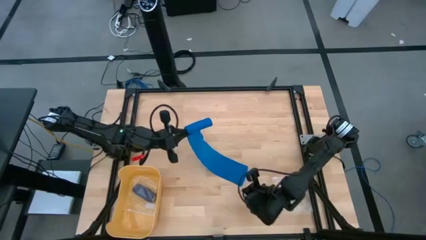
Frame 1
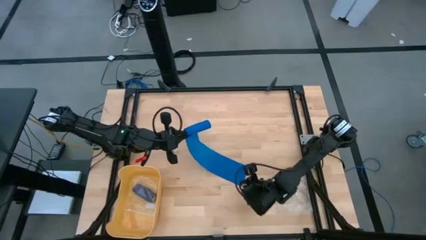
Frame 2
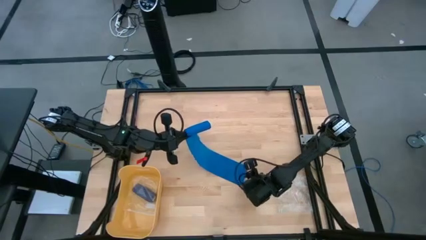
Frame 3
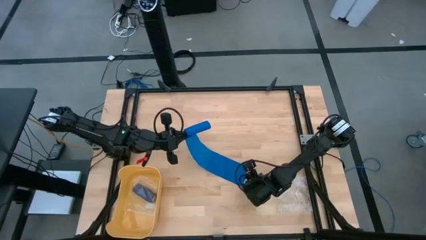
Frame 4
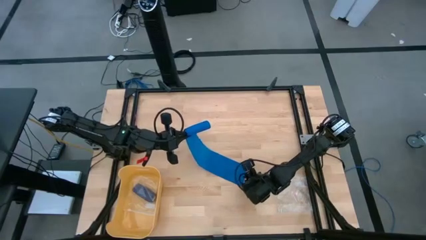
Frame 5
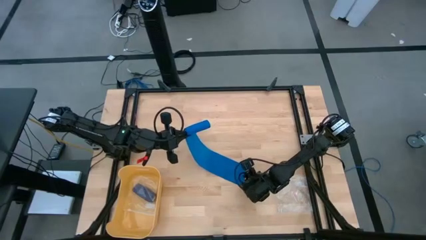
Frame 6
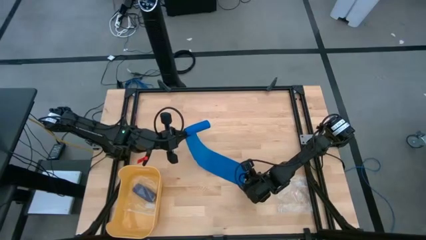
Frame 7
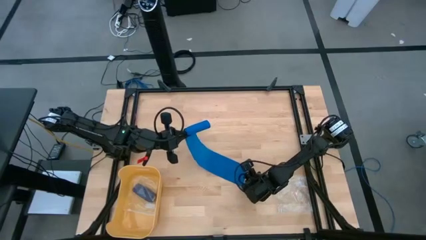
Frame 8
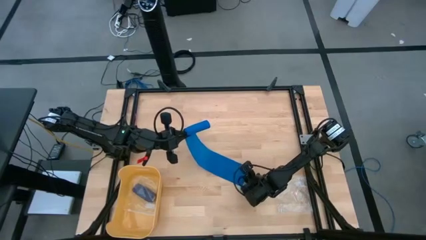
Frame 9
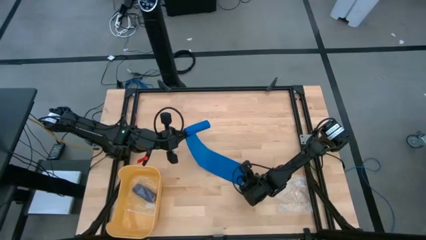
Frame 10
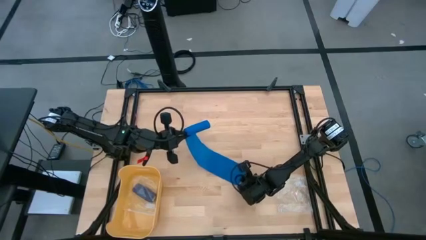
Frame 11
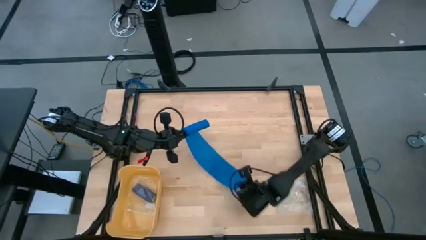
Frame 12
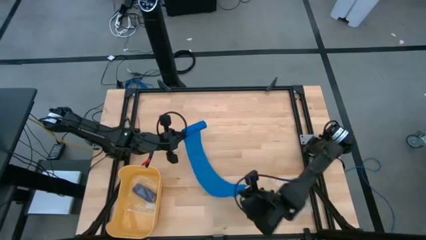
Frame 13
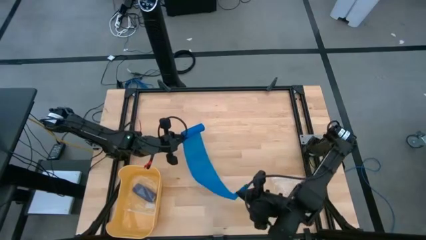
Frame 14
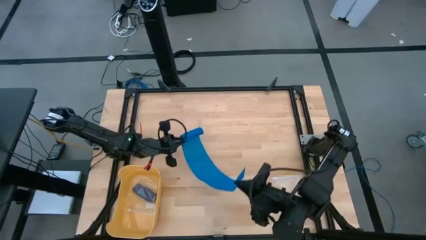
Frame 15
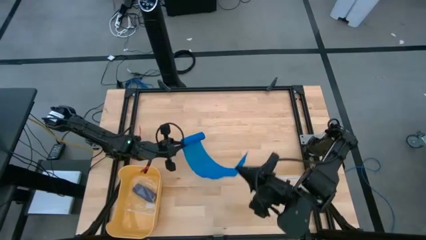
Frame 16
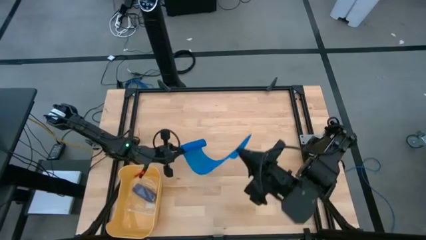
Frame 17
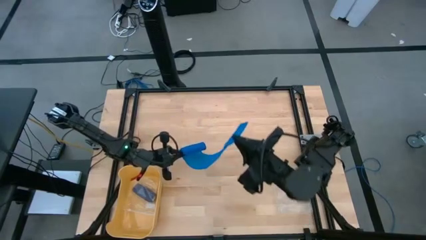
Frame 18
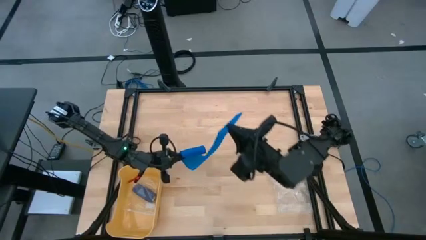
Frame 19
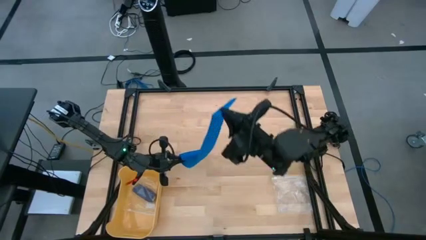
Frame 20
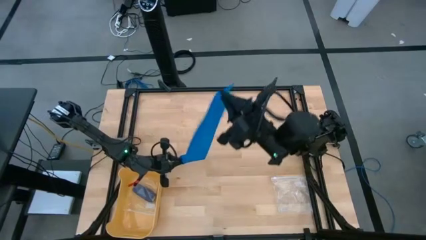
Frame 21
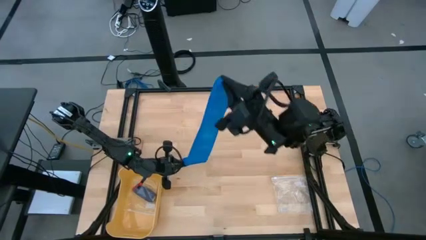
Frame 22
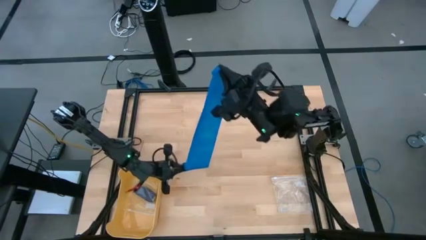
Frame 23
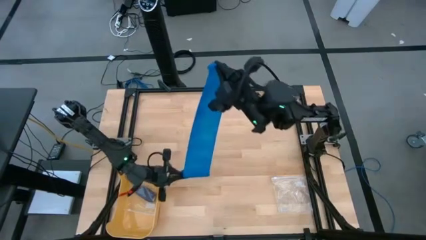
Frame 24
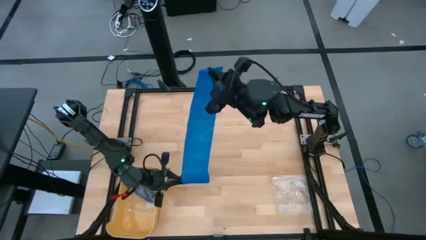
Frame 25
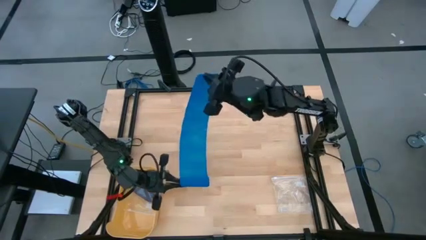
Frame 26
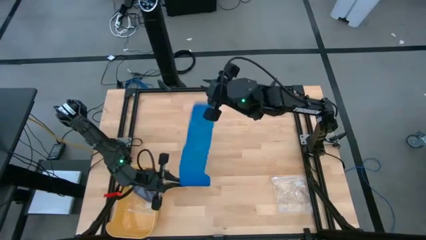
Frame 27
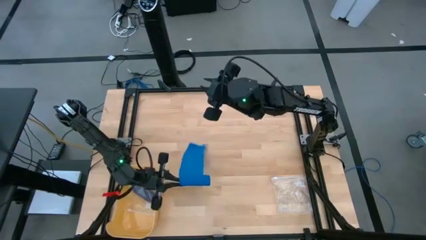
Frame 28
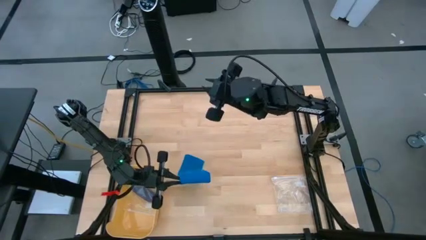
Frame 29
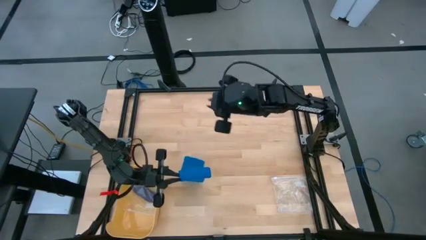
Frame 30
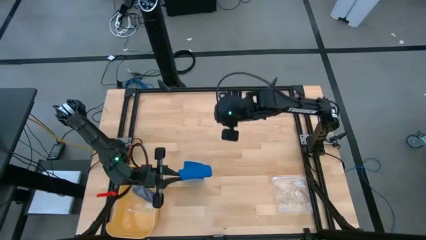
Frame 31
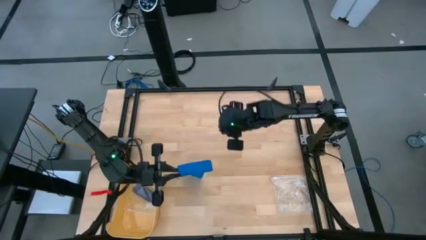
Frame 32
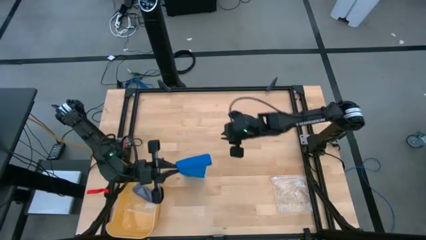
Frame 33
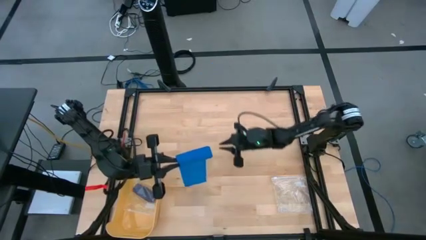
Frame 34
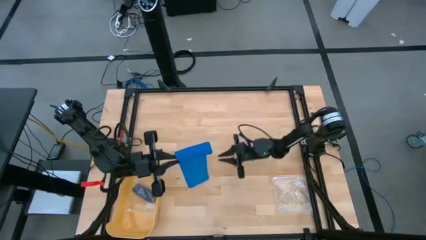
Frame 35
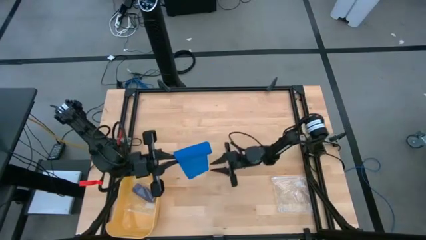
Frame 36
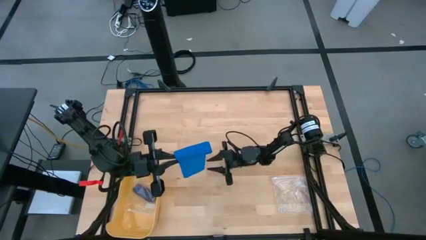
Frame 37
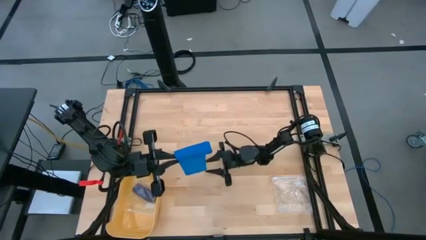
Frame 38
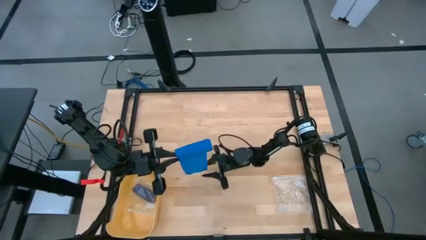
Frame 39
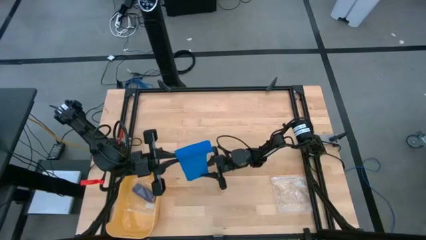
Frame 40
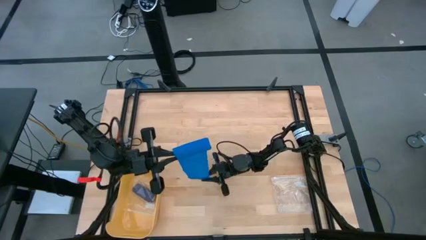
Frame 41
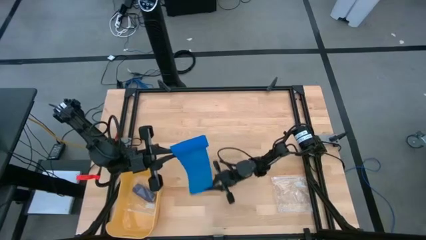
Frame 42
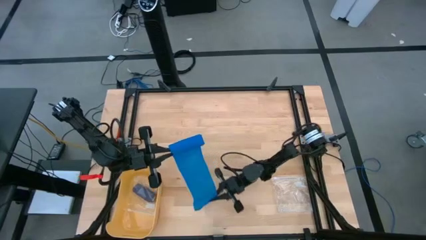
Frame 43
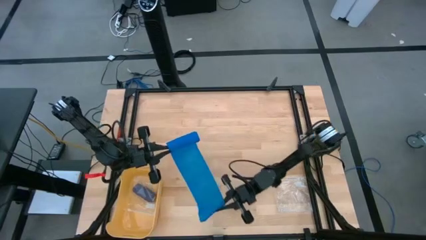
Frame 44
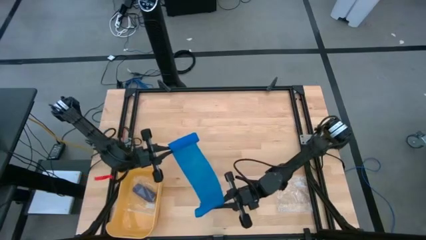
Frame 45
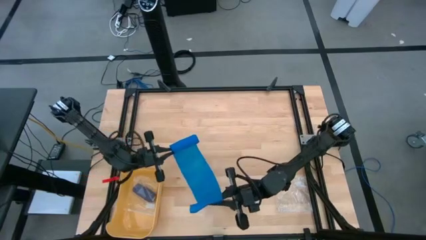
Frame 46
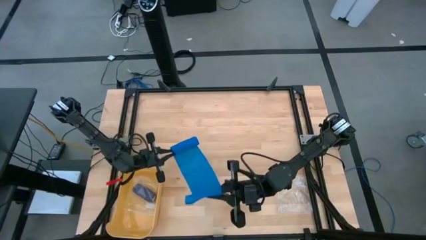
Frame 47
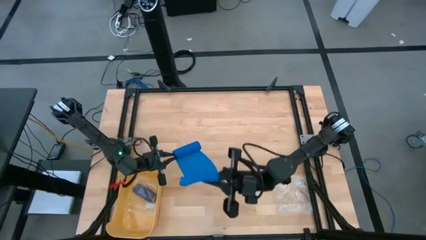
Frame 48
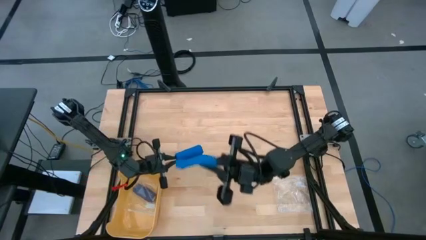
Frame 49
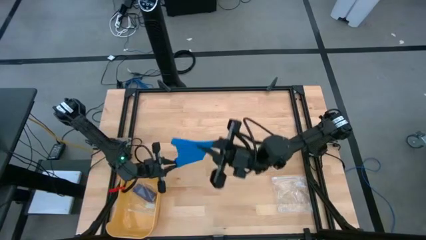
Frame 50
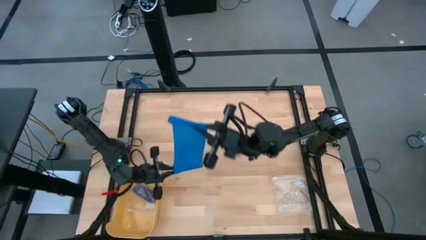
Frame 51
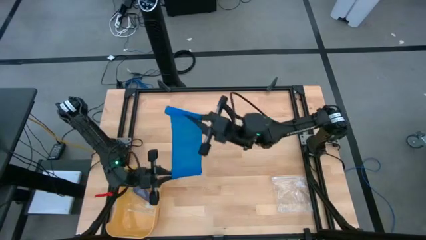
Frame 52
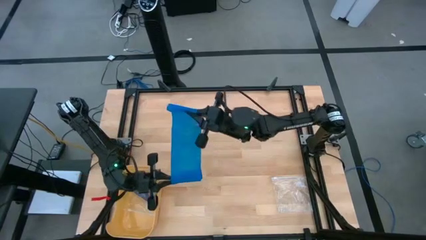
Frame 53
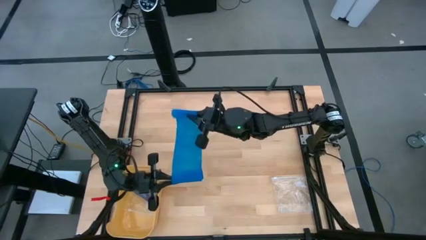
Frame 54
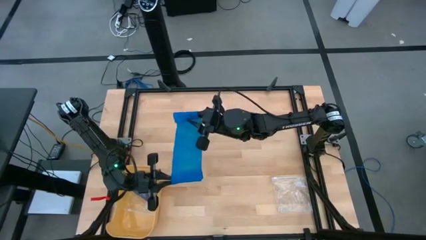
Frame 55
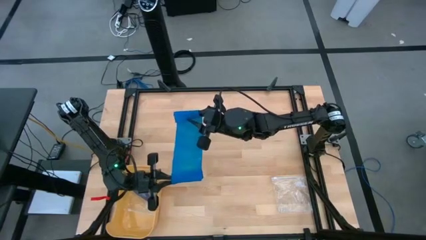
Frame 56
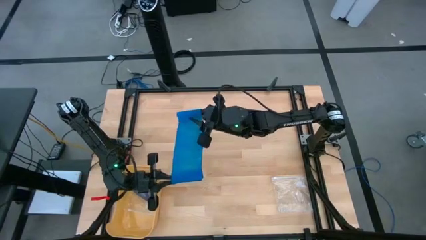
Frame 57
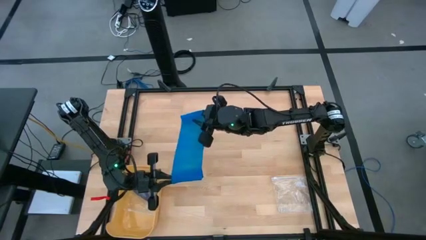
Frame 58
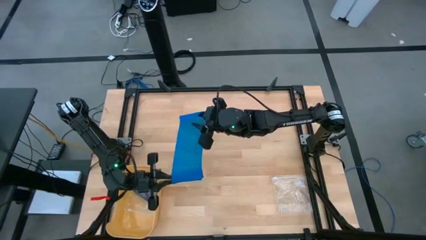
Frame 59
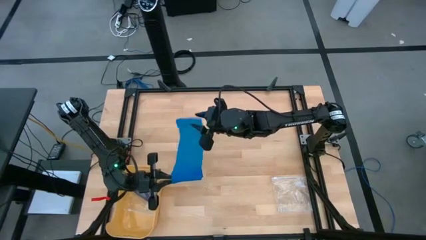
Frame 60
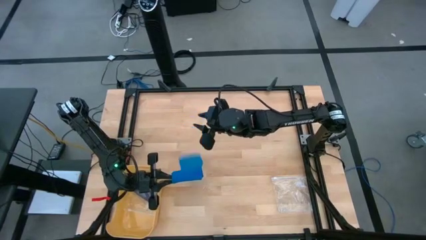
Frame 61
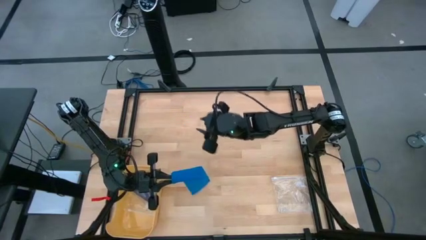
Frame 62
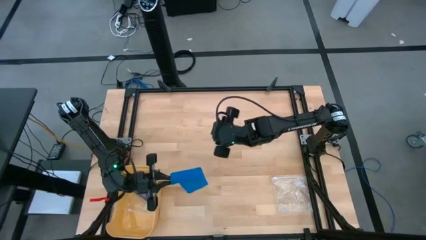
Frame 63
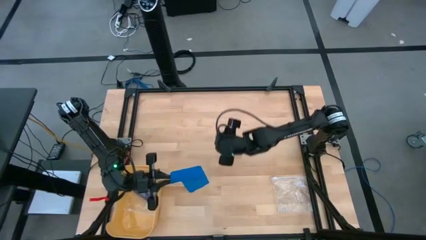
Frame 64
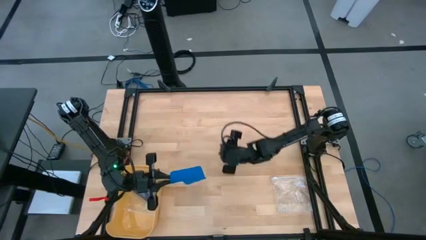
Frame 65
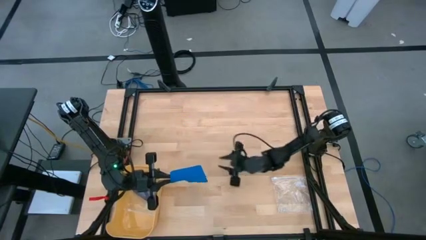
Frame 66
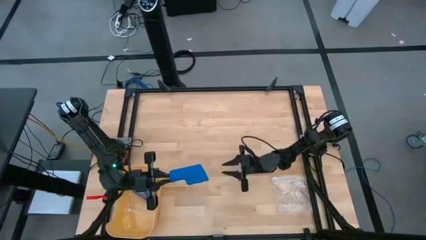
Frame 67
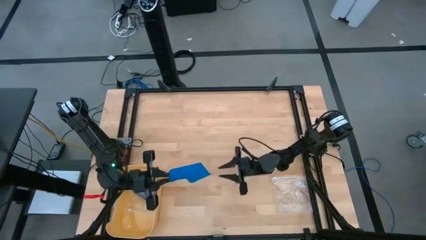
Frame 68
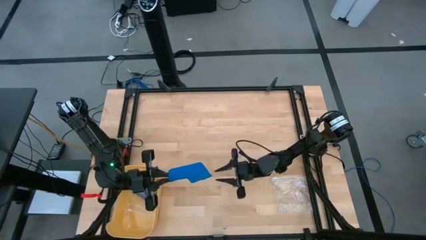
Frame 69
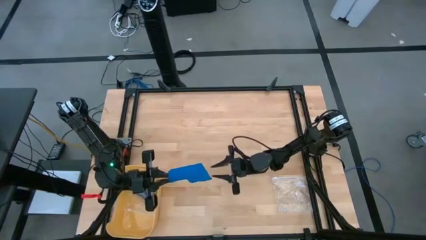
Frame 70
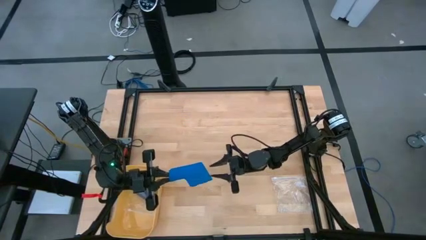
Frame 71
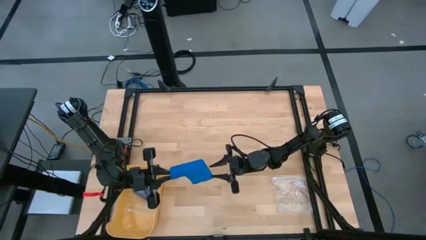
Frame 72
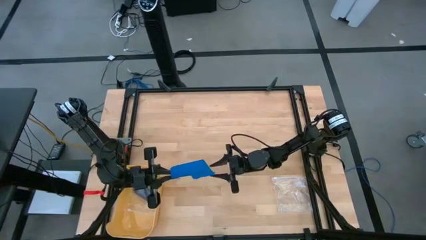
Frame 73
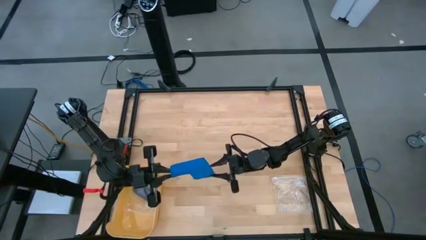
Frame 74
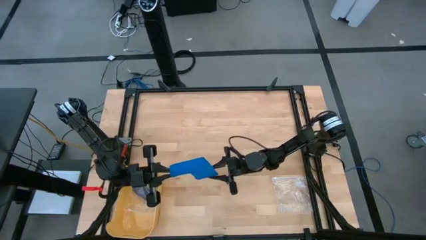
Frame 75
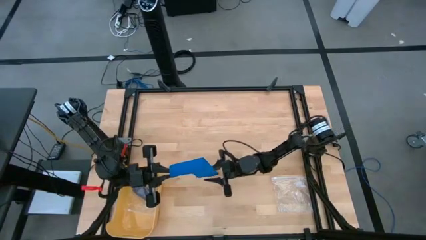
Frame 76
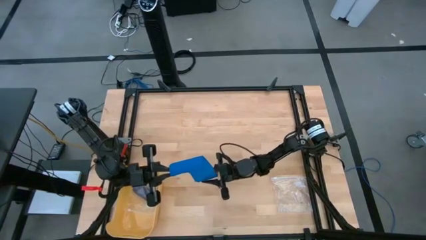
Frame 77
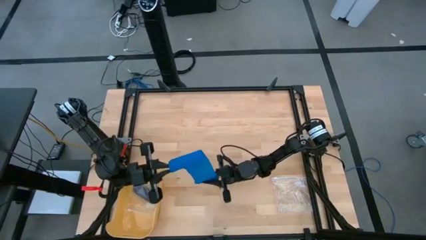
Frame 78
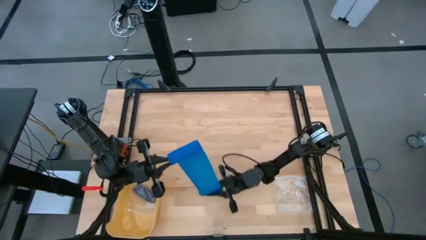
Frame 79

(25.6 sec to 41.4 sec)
Task: Roll bandage
Roll the blue bandage

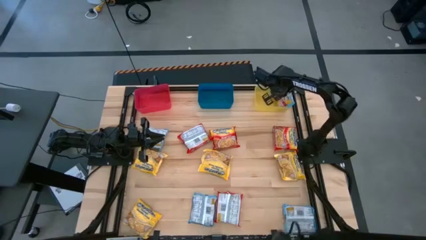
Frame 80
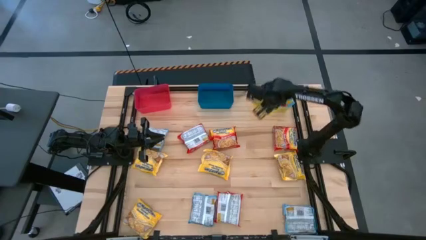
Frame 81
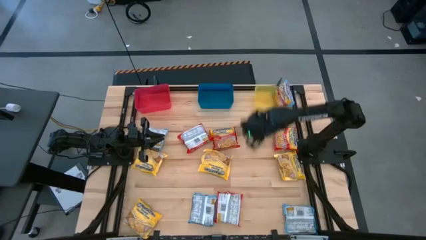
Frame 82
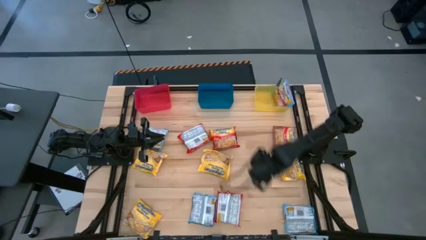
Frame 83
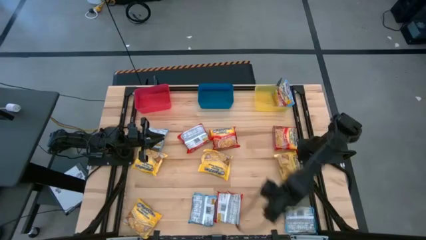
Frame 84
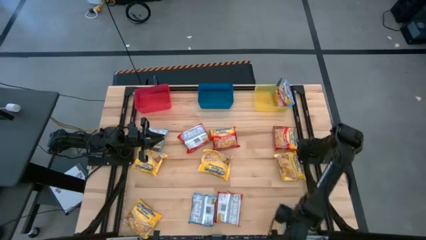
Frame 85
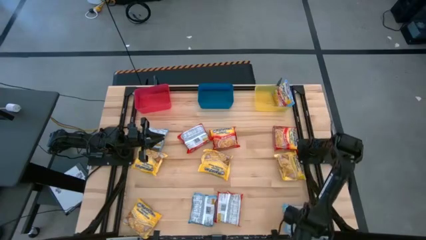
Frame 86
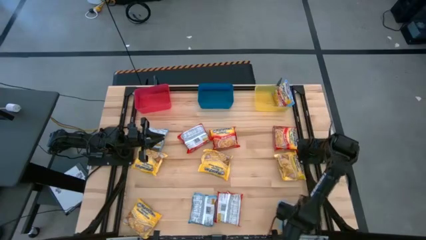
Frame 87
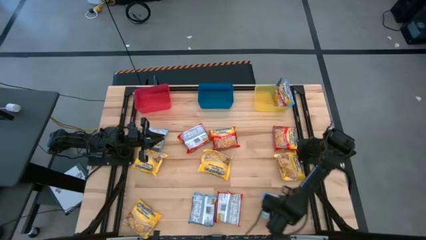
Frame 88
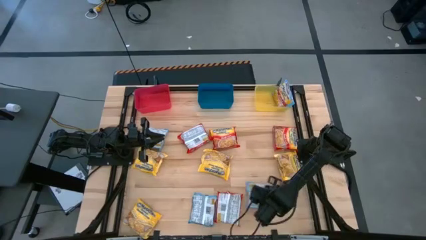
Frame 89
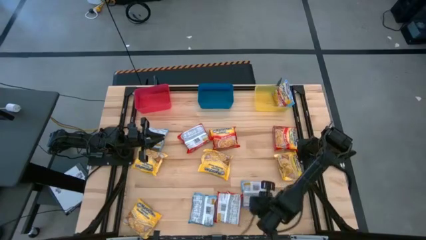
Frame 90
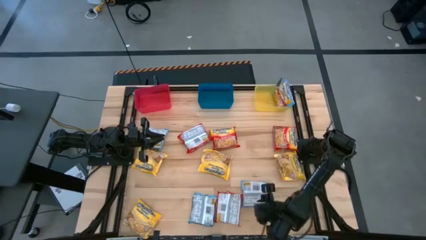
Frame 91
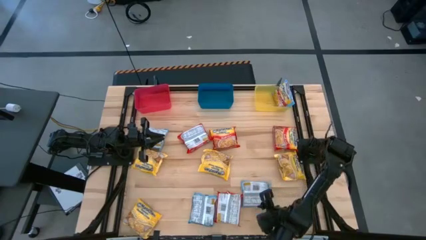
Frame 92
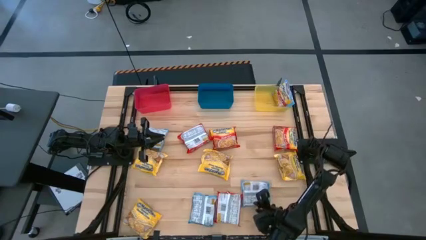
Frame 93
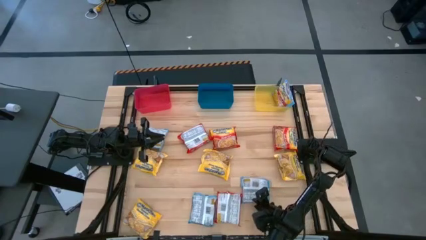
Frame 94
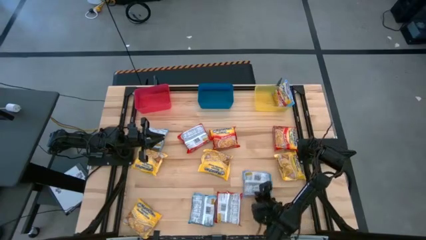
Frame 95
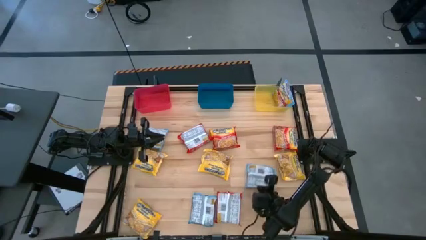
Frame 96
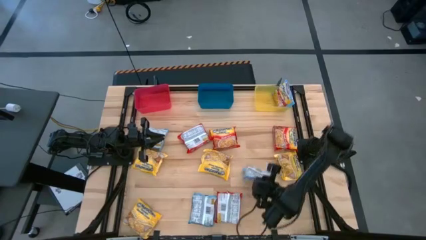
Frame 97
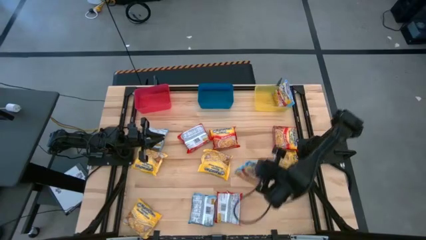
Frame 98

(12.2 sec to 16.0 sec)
Task: Sort Maruchan noodles
Put the blue noodle pack into the yellow bin
